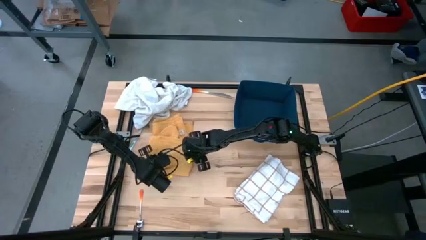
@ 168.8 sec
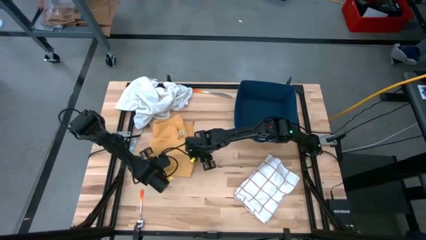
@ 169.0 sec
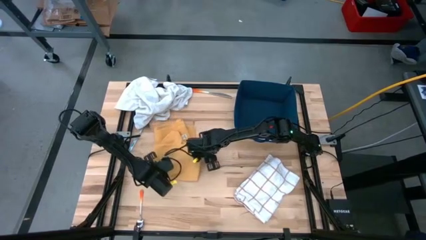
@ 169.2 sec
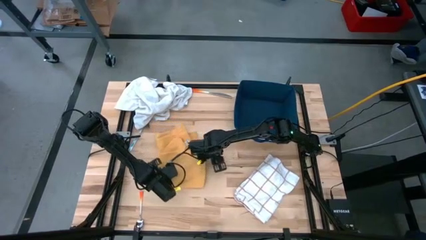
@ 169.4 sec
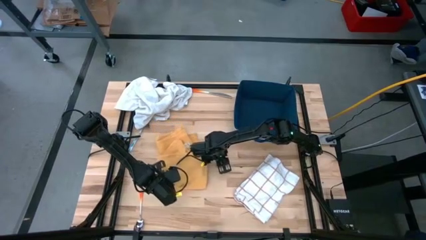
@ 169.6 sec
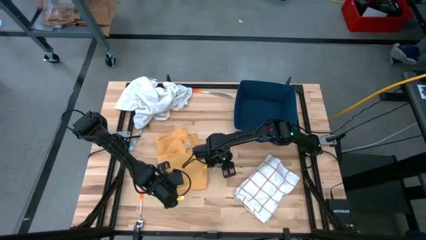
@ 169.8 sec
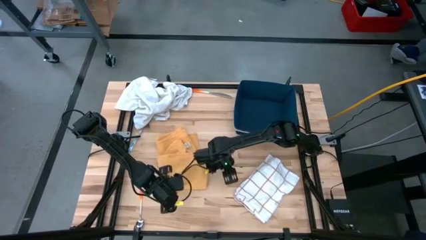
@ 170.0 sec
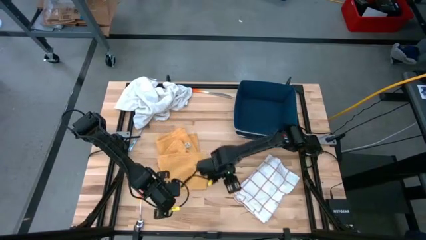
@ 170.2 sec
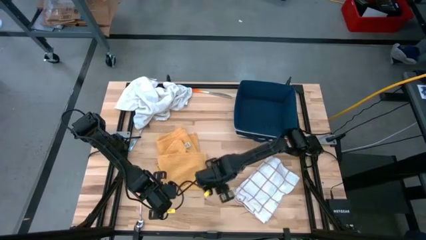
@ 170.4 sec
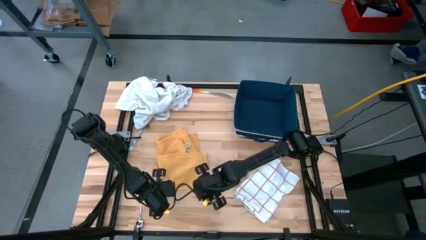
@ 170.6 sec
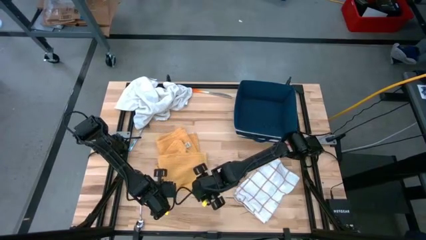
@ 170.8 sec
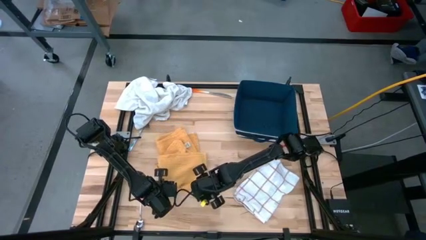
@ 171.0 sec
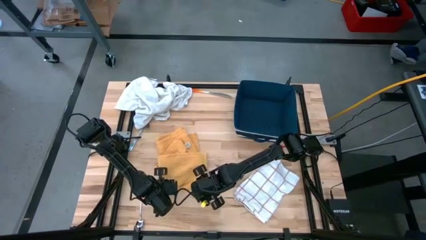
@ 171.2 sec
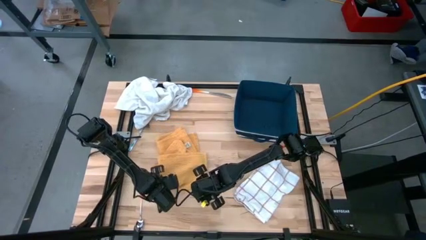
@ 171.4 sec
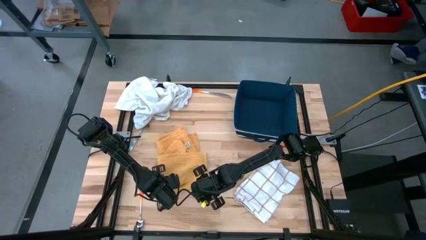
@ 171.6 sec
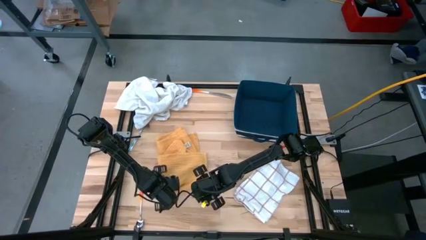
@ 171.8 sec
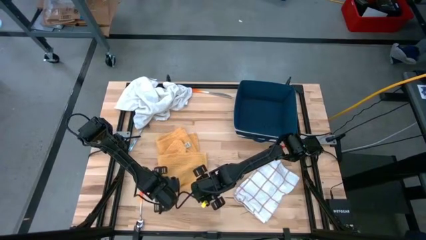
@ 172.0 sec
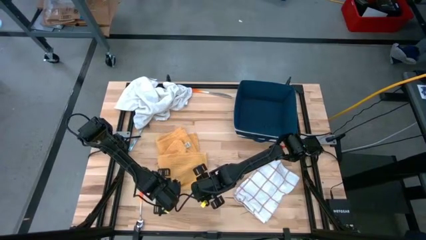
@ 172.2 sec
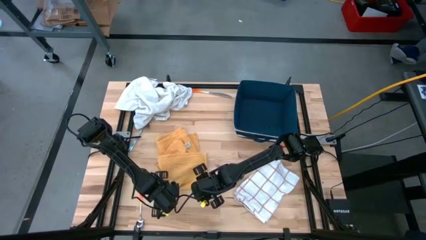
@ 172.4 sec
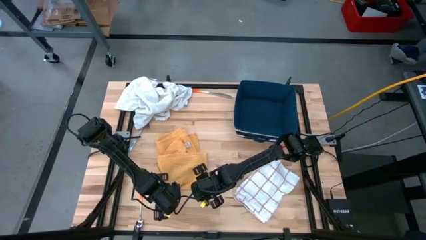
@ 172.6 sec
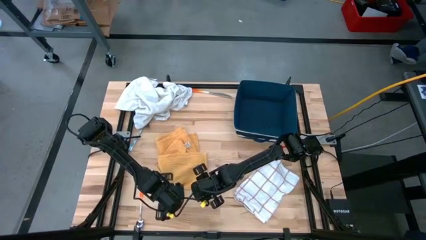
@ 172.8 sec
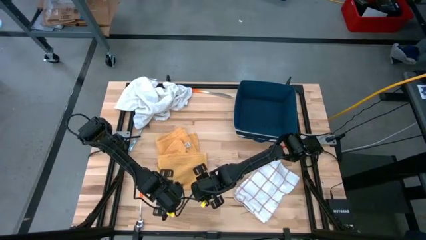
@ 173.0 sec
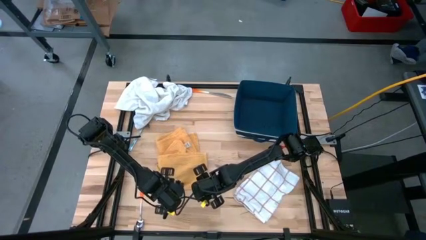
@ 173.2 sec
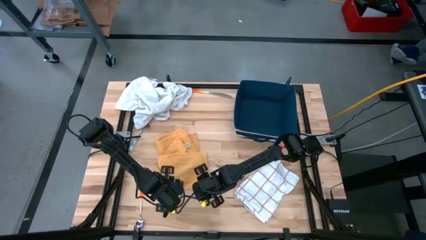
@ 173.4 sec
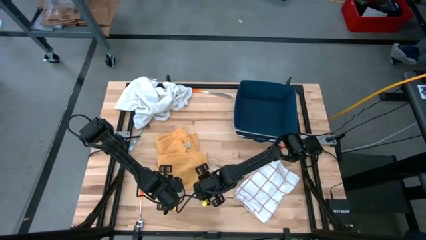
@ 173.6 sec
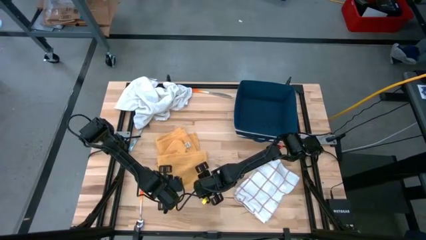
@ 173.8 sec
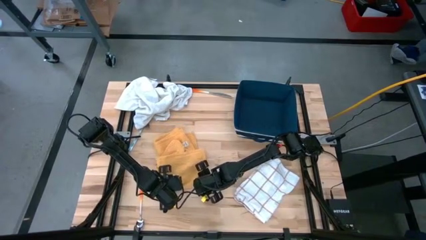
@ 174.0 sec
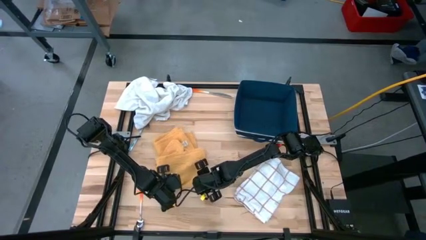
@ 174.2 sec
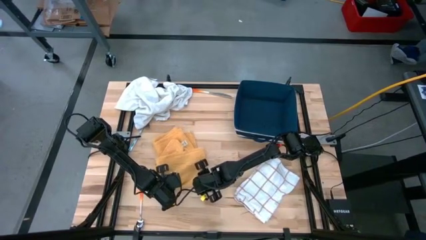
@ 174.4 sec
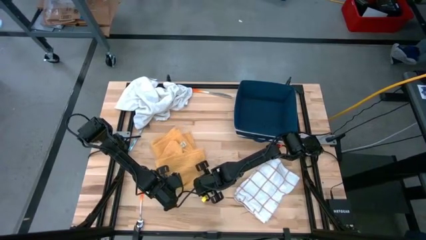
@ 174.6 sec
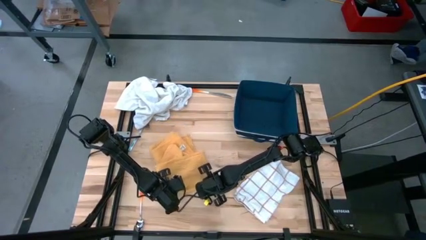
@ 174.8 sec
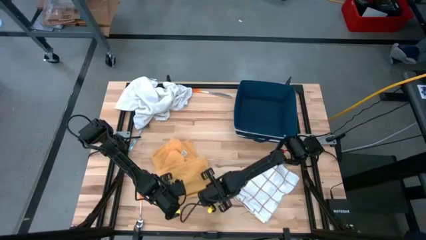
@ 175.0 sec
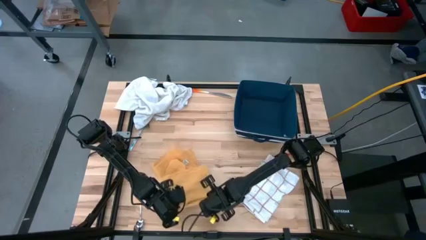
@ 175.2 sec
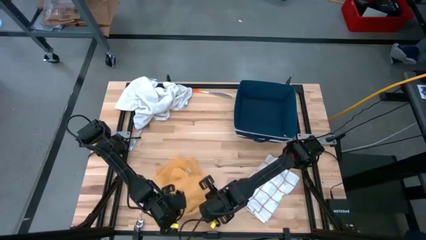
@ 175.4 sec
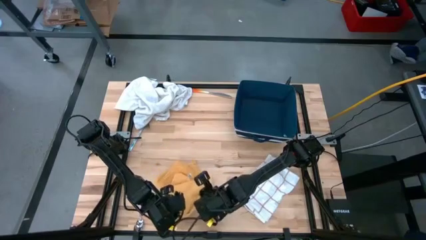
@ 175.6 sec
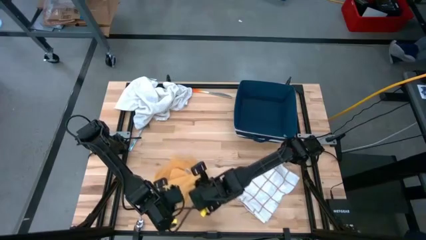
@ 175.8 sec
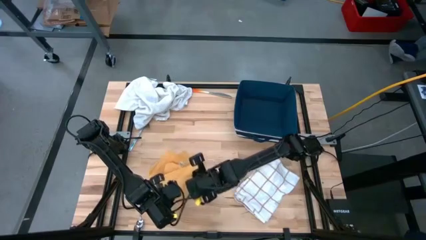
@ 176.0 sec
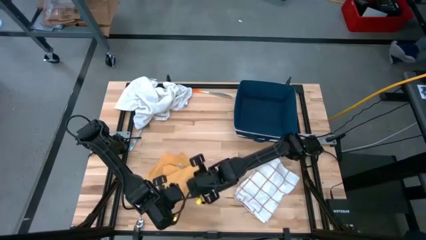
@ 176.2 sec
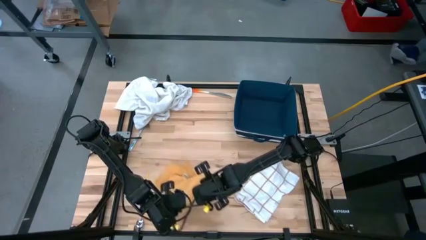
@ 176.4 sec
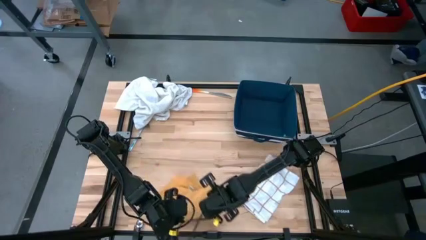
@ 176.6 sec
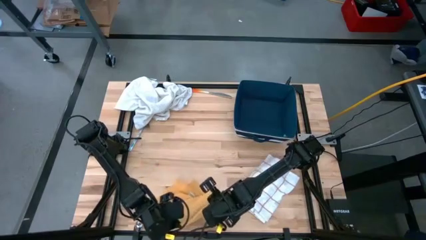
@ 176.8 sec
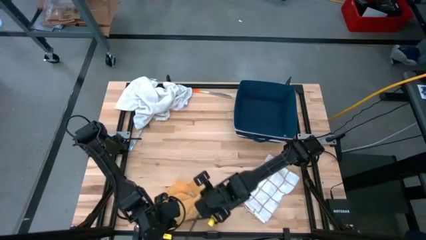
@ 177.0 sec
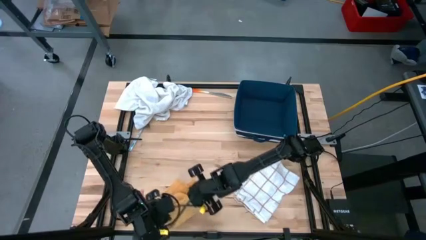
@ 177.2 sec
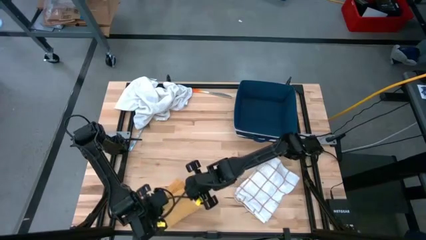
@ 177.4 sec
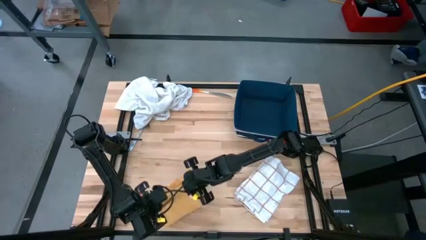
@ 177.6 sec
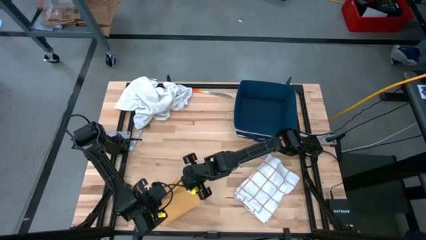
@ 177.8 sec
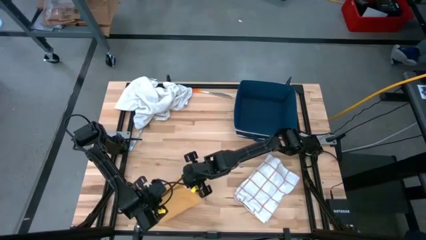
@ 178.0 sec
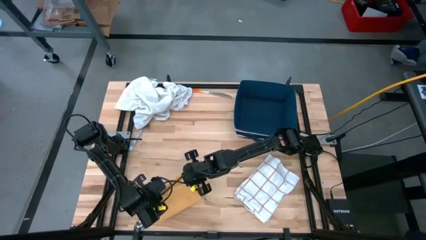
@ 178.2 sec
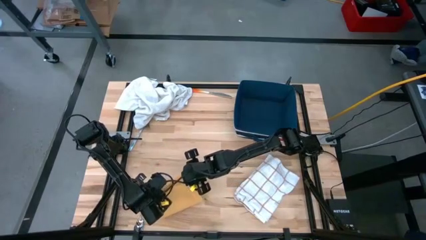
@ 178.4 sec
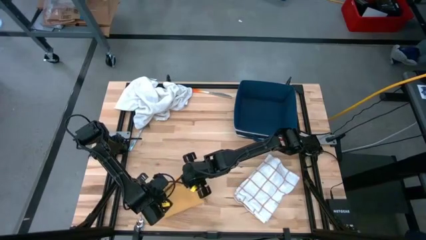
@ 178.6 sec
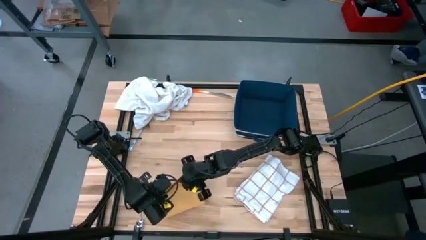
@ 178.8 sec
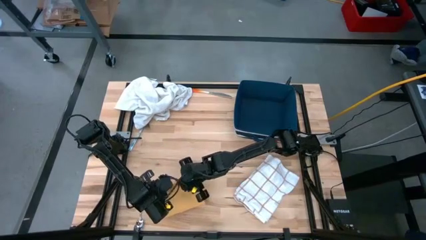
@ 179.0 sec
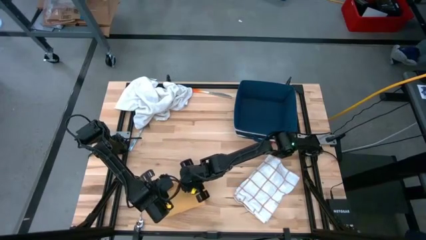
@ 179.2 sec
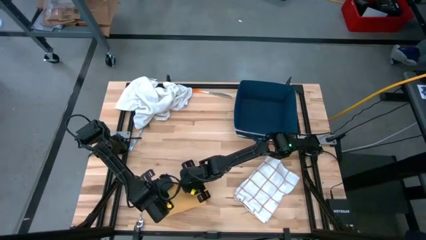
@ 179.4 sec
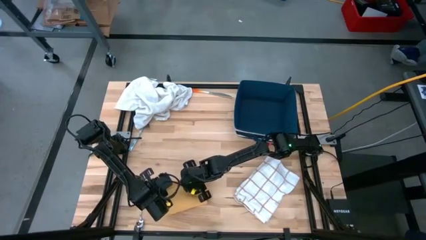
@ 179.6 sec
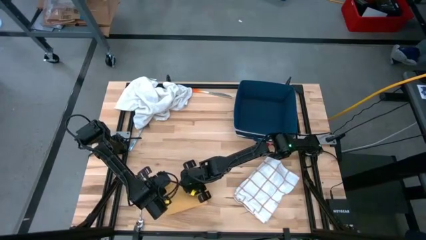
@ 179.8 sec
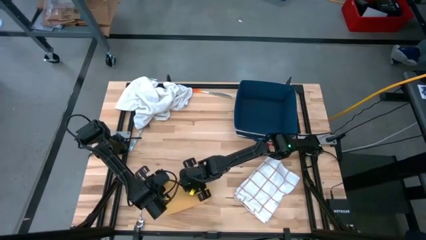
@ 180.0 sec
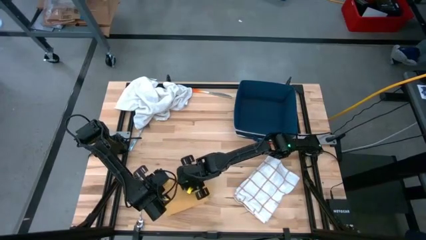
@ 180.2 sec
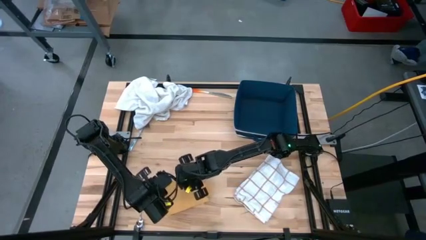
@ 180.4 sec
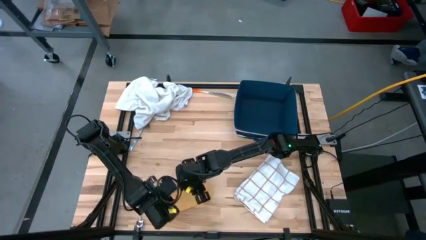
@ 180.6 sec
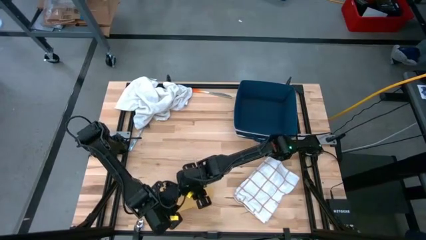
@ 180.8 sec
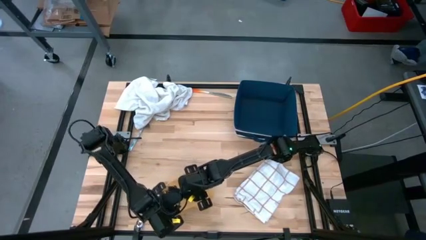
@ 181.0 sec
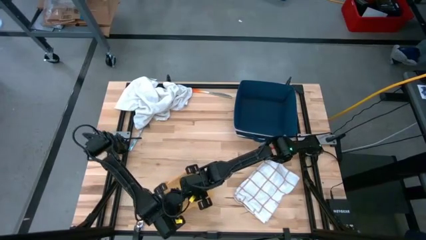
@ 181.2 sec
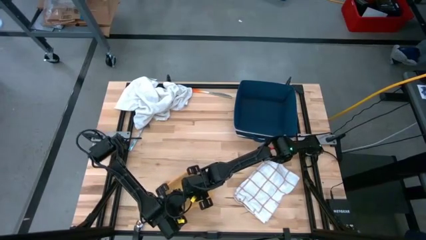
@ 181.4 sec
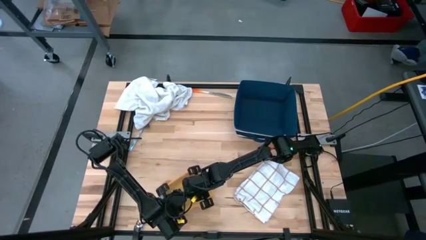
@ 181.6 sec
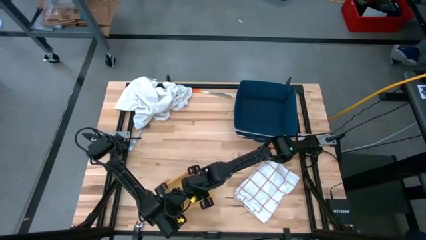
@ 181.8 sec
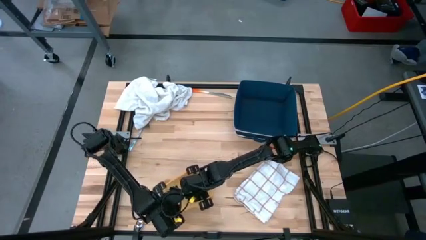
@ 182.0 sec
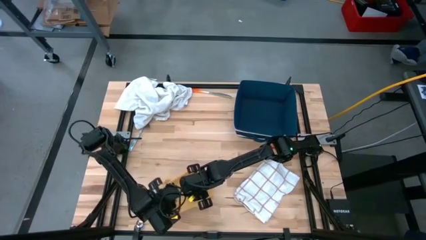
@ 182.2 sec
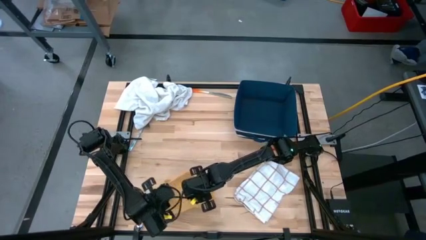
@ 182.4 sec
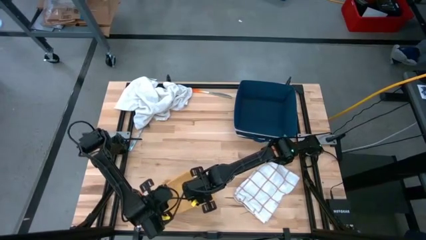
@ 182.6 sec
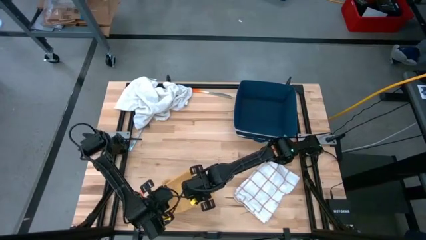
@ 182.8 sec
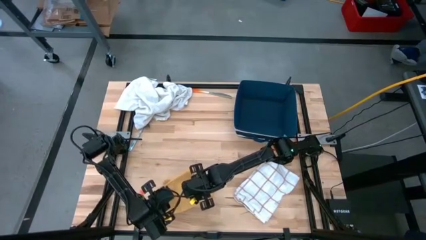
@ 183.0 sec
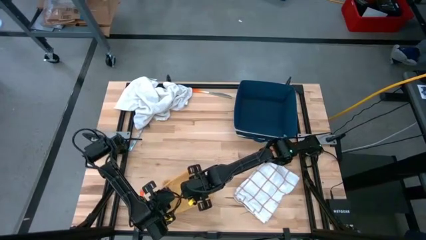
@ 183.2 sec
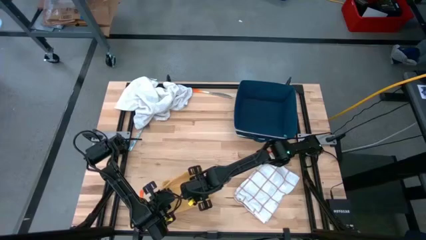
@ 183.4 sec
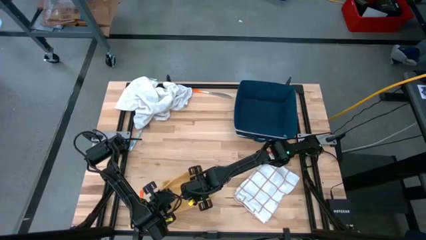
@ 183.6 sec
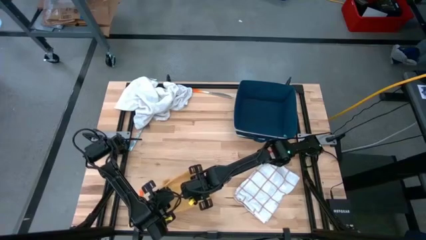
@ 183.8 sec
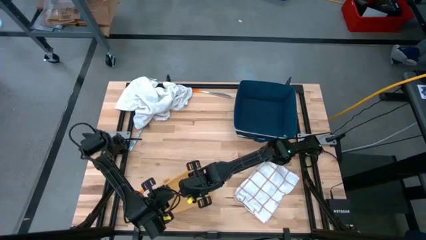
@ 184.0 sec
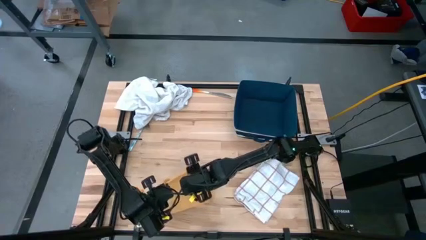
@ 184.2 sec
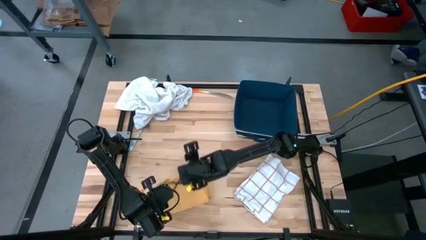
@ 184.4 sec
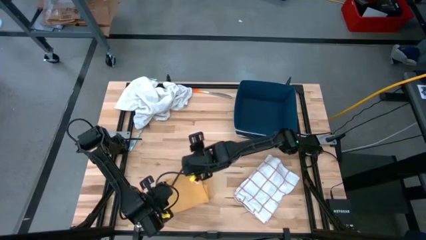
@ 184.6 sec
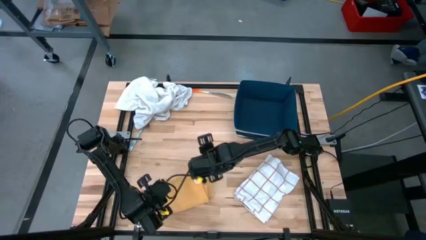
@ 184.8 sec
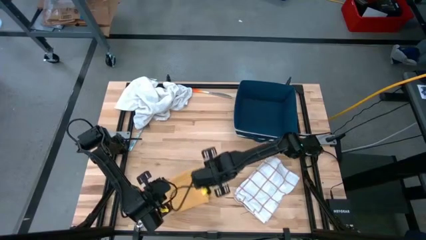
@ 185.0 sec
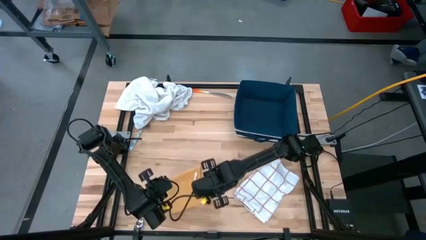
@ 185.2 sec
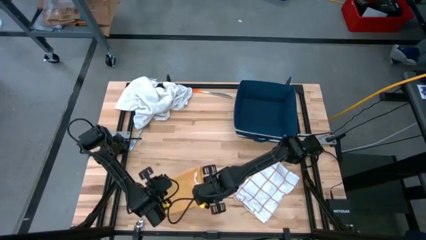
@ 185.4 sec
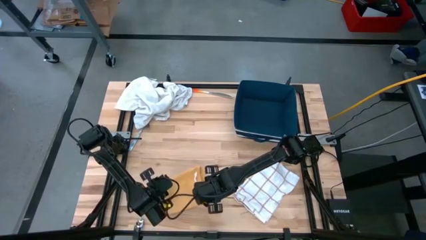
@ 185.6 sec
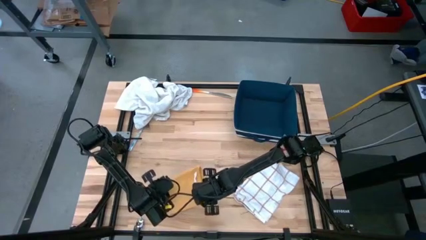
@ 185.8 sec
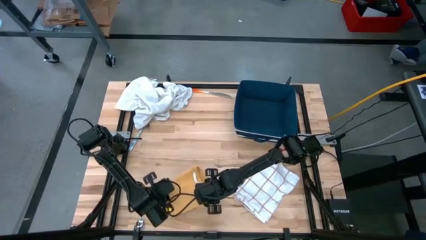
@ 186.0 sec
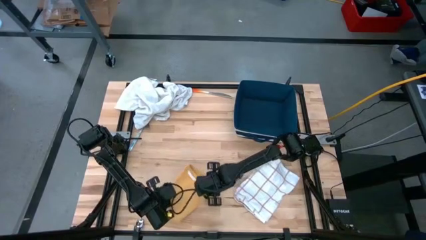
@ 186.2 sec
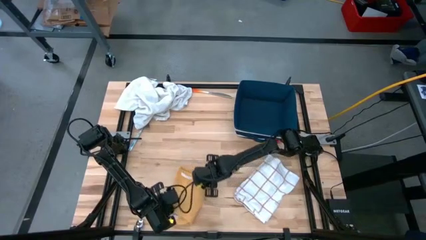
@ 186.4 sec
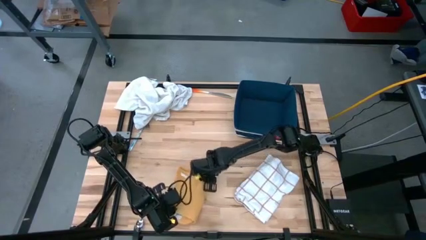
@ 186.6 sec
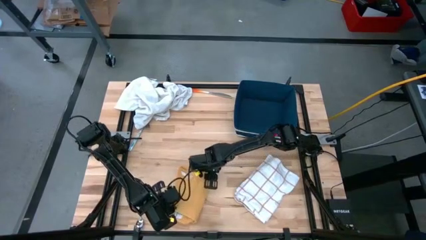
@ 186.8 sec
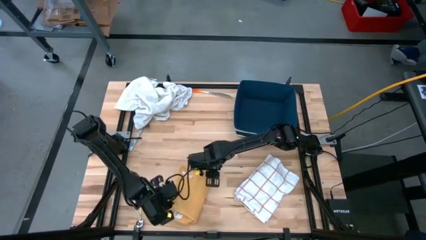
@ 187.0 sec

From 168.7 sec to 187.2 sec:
Task: Fold towel
Fold the yellow towel
